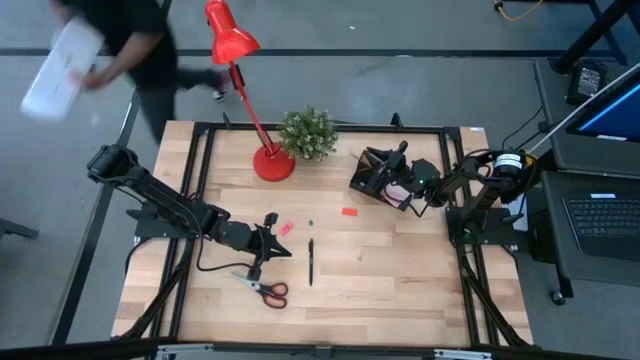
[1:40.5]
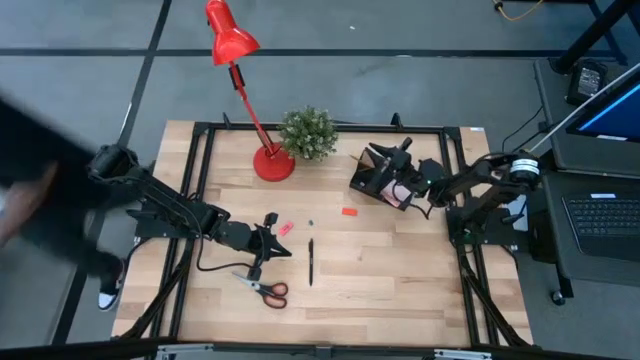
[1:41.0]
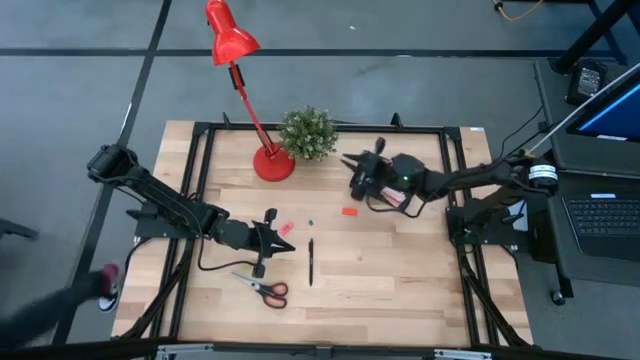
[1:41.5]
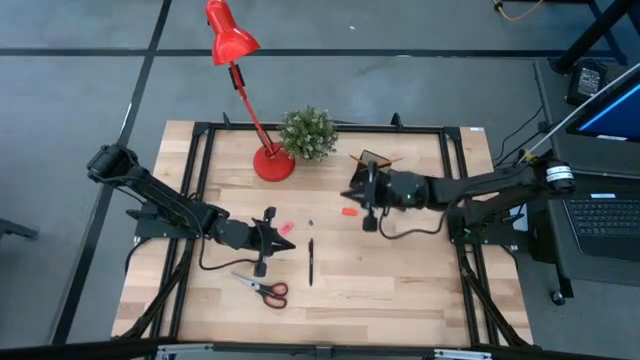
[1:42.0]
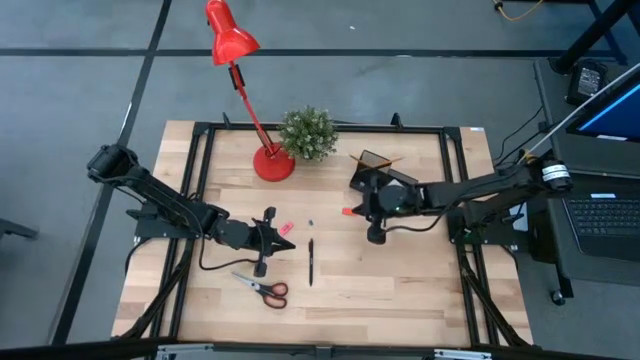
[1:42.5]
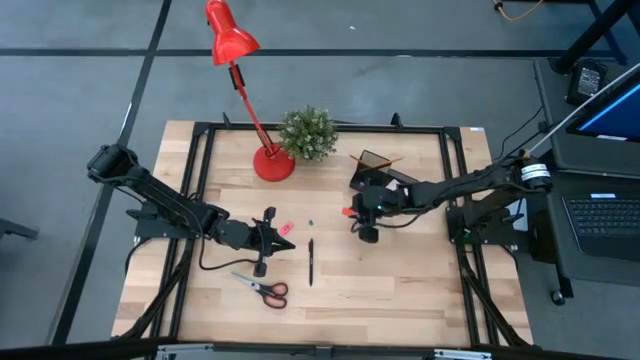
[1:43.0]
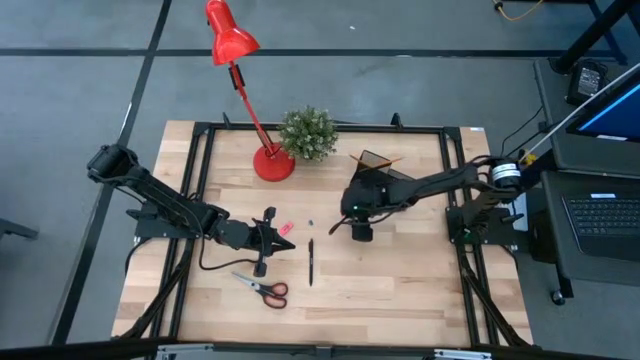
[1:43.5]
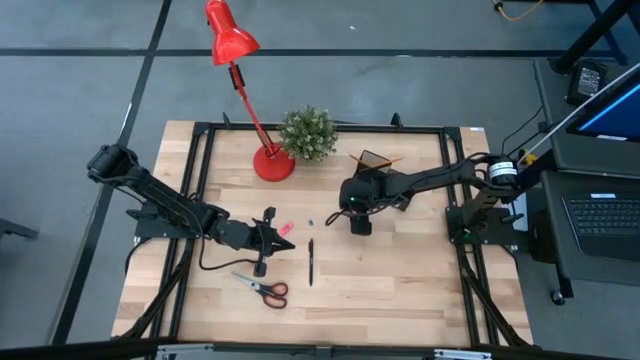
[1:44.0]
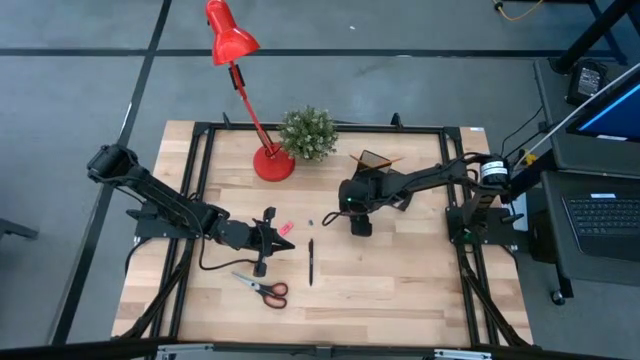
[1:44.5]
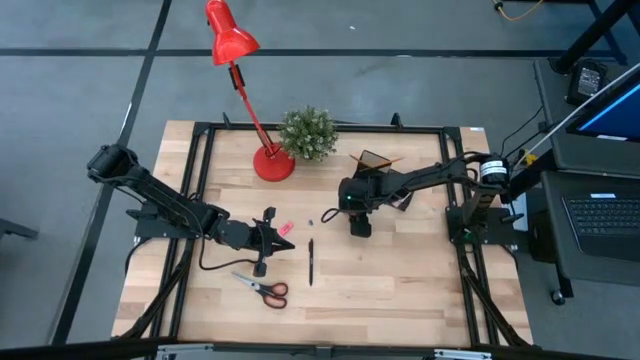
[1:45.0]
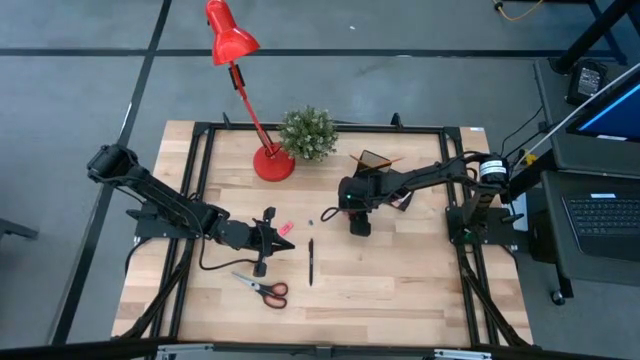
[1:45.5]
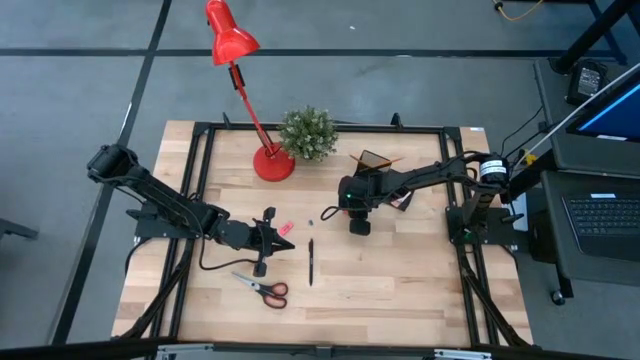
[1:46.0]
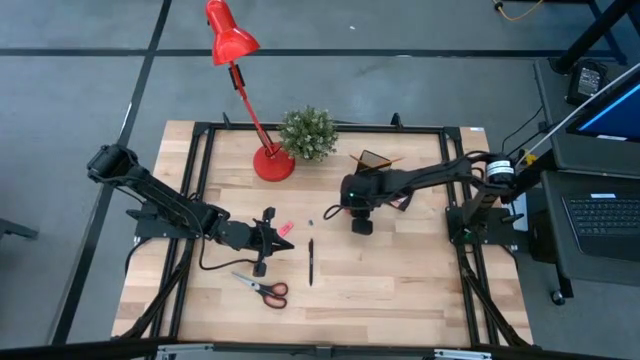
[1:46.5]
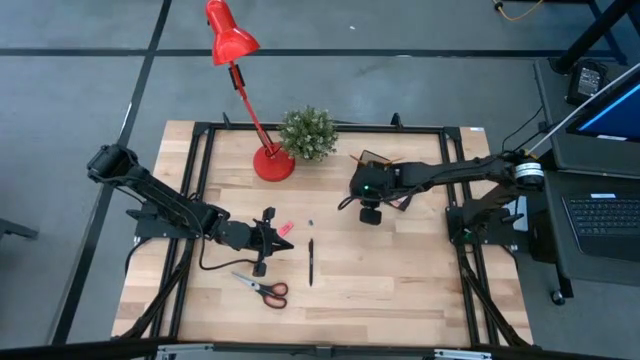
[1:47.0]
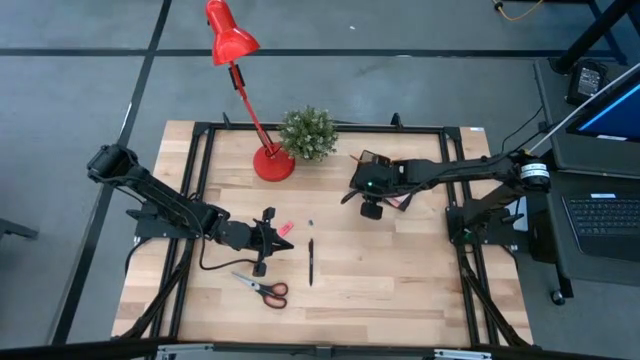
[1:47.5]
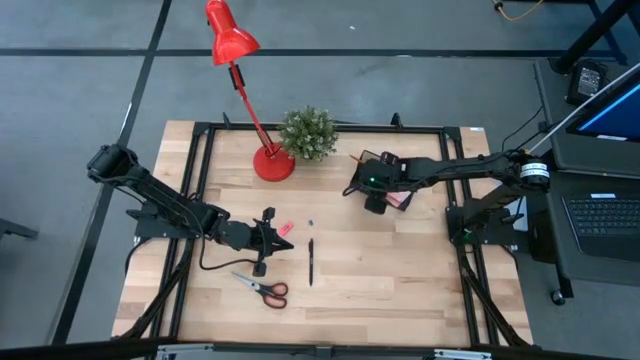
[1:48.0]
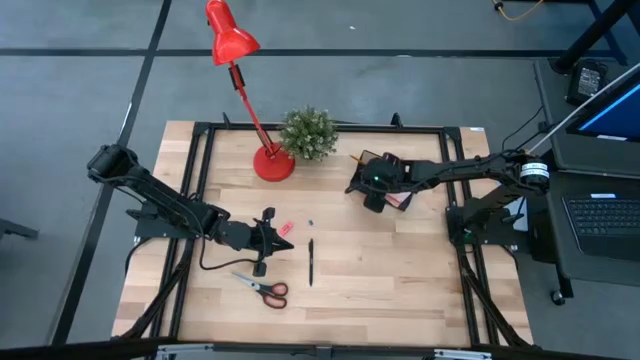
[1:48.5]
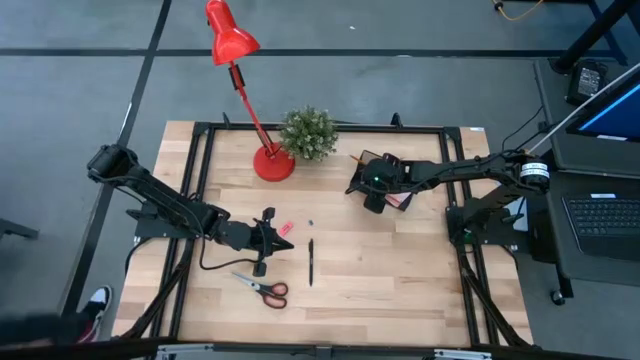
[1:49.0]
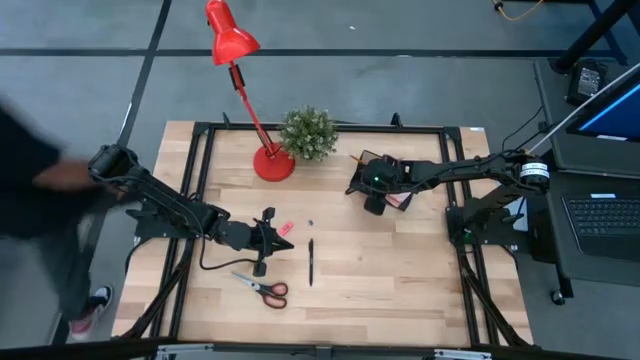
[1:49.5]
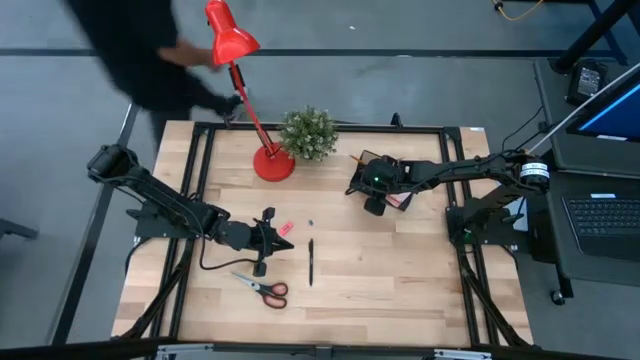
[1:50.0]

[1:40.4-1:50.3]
Task: Pick and place office supplies into organizer
Put the orange eraser into the black desk organizer

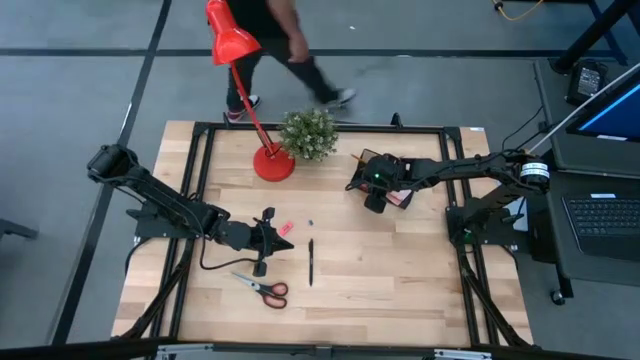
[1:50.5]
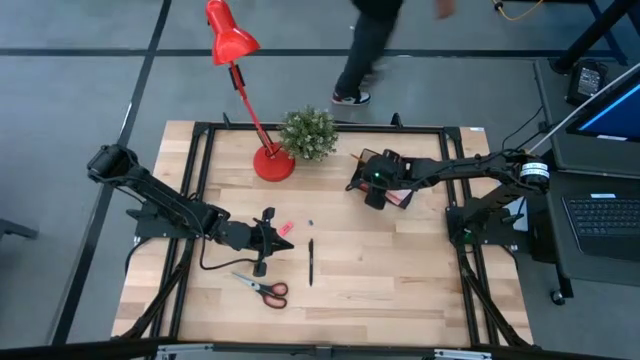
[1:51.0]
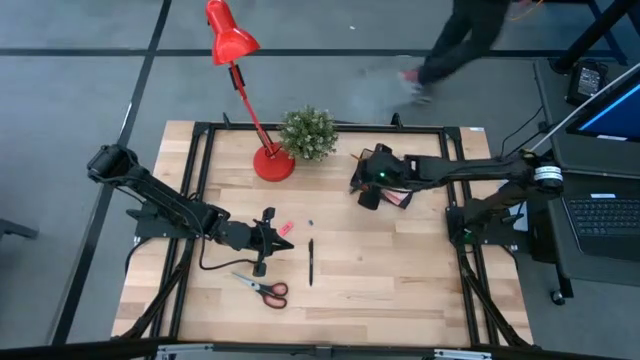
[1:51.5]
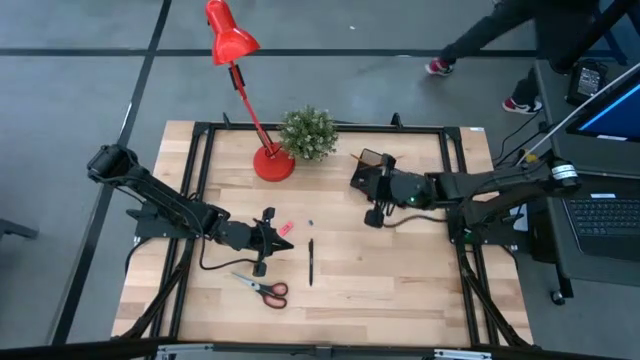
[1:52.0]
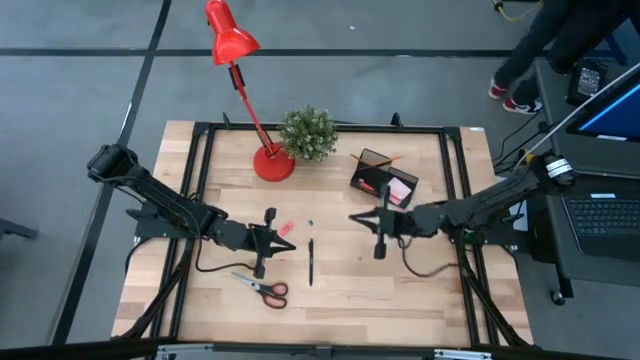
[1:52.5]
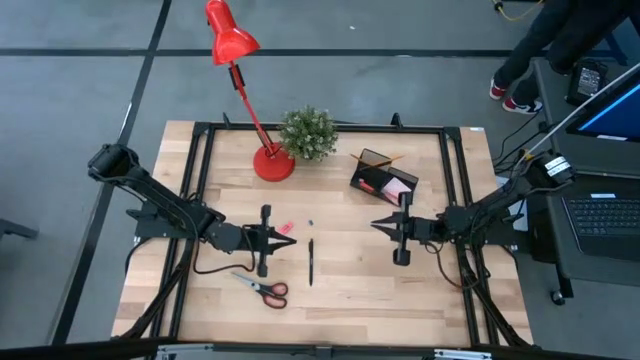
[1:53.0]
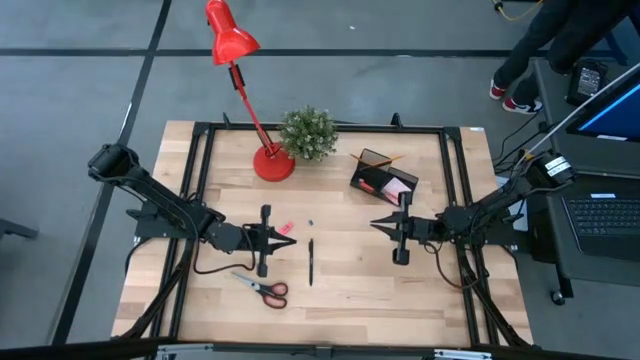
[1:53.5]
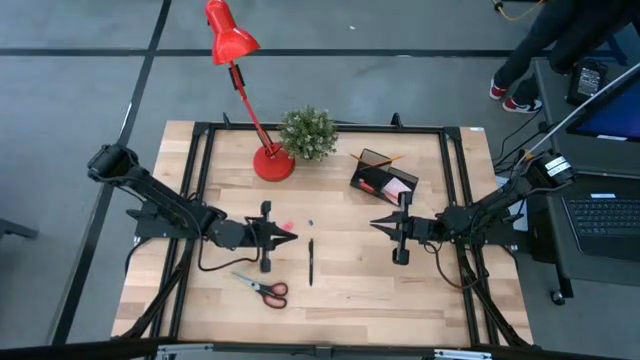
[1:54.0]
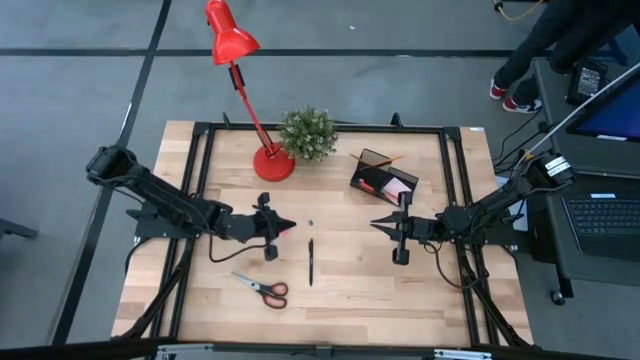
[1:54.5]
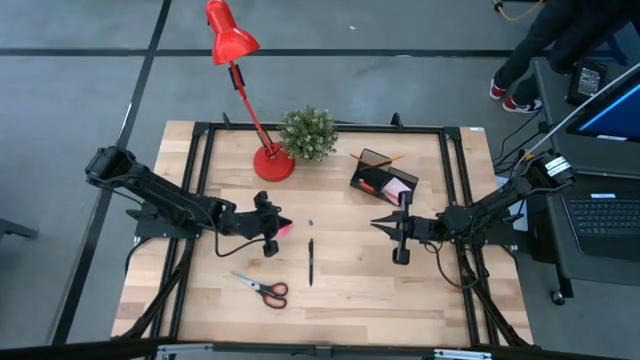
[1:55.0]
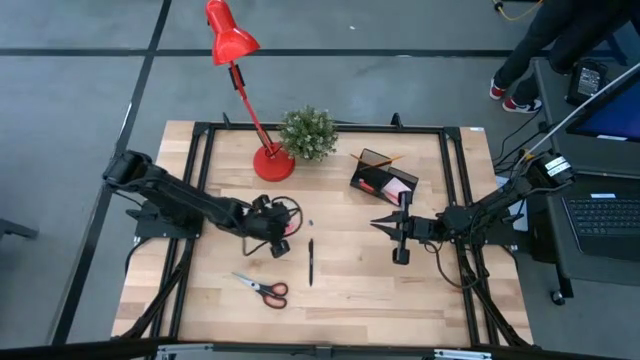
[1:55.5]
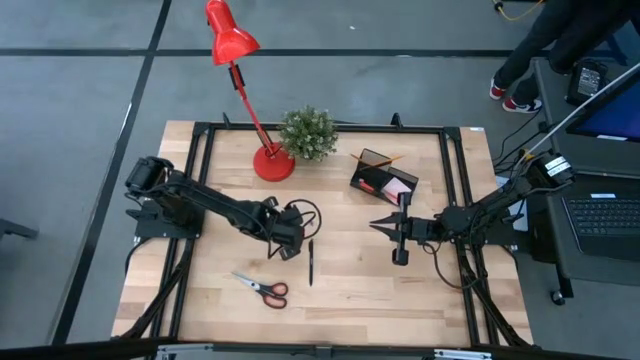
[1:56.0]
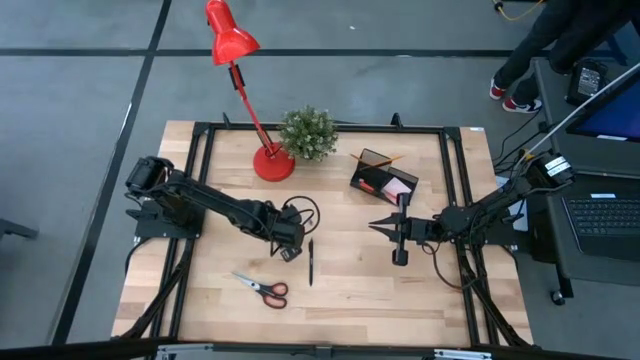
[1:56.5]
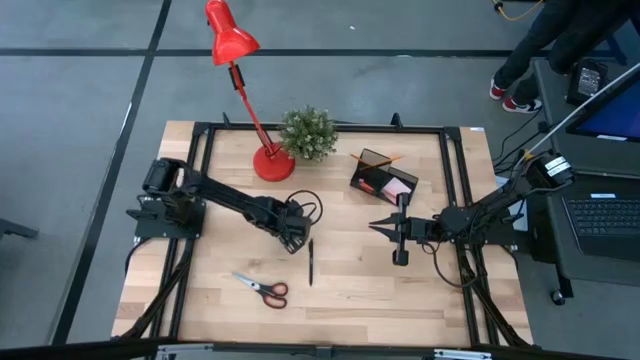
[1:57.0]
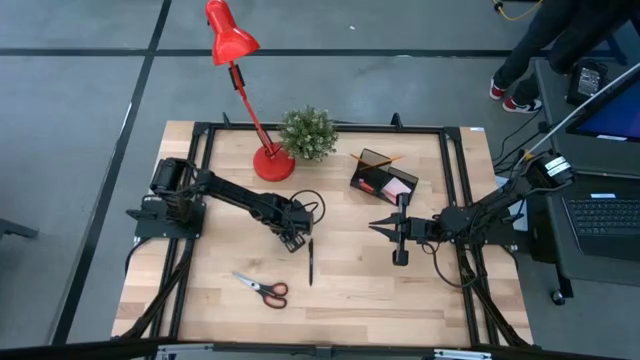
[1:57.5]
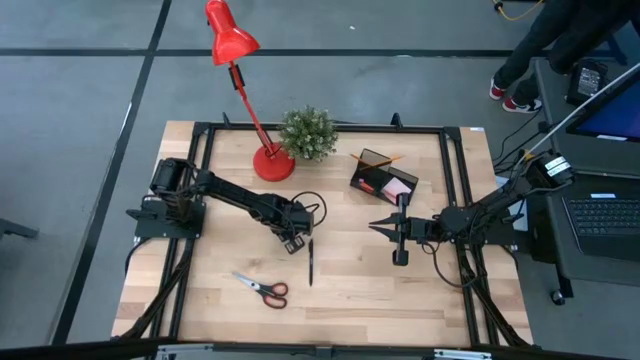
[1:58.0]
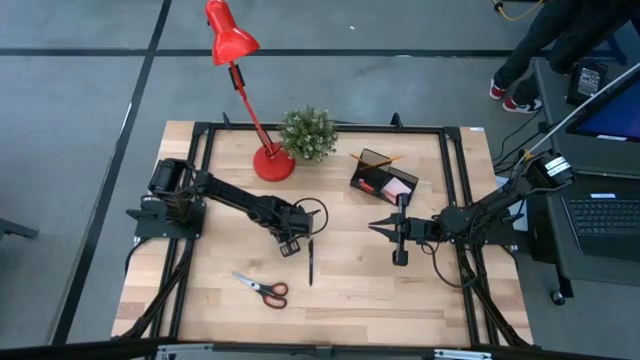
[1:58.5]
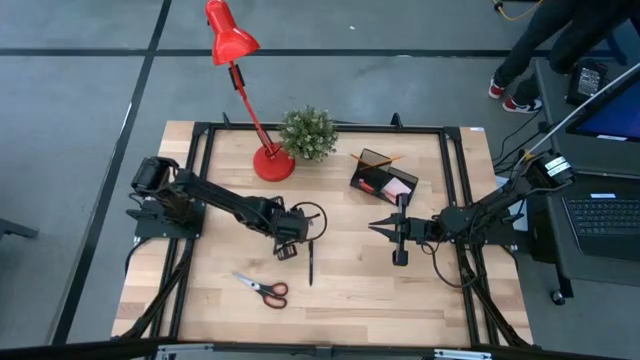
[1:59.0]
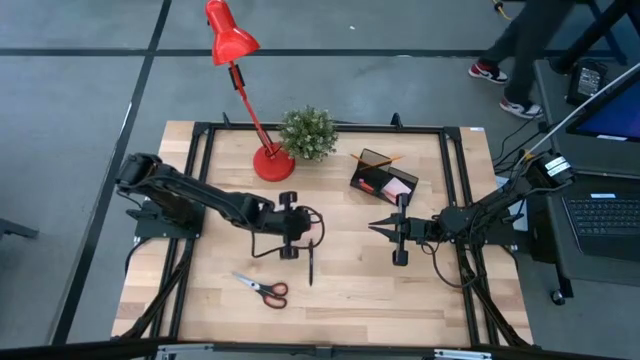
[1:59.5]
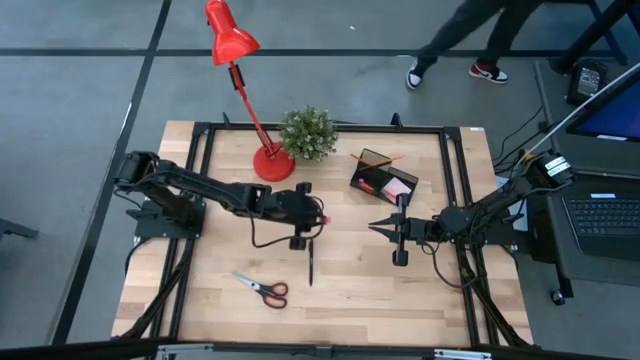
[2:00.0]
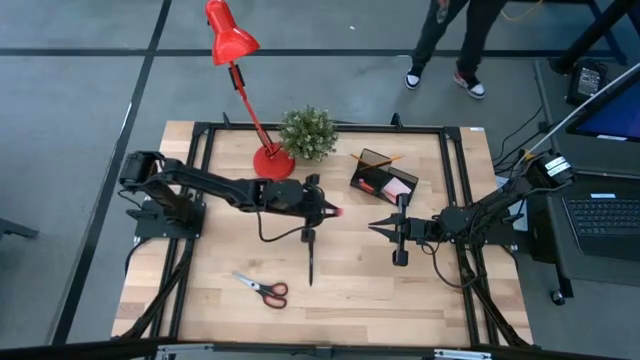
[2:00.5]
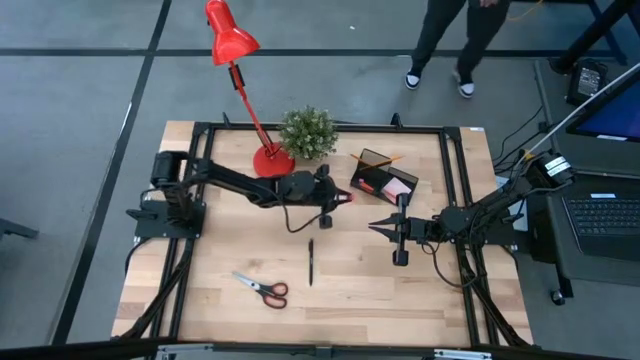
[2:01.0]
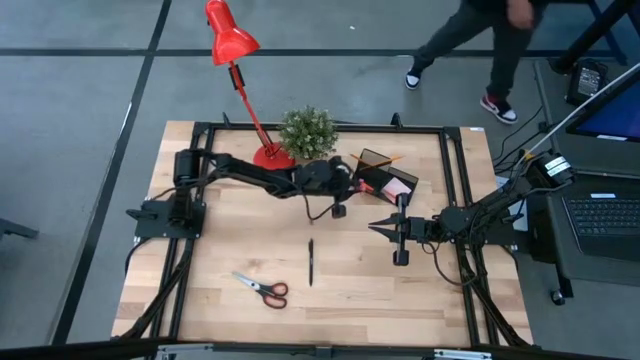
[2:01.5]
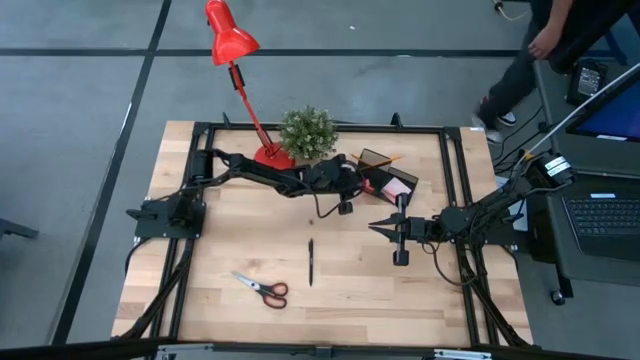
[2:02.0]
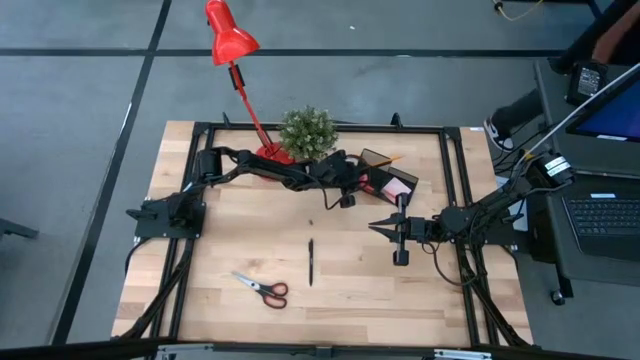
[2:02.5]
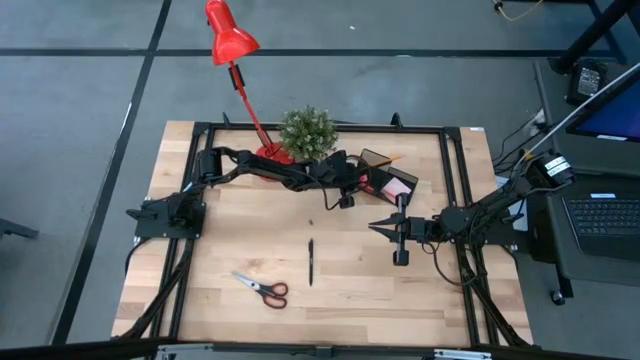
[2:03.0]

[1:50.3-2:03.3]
Put the pink eraser into the black desk organizer
